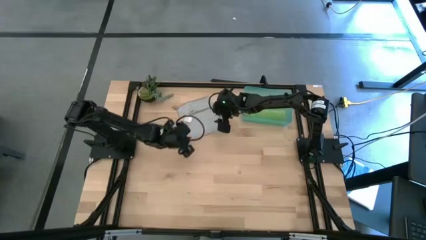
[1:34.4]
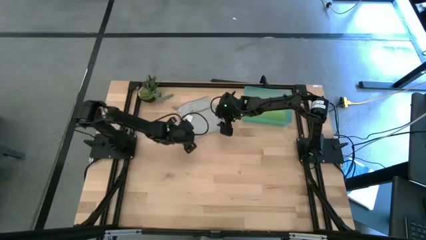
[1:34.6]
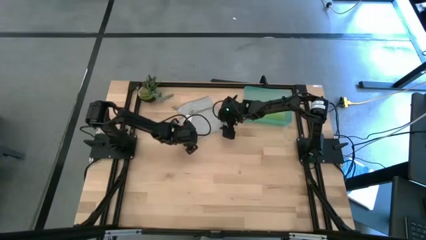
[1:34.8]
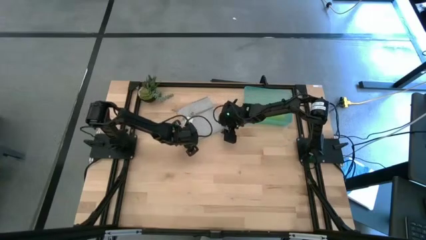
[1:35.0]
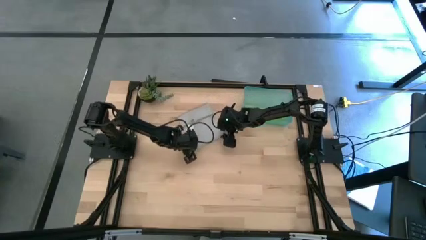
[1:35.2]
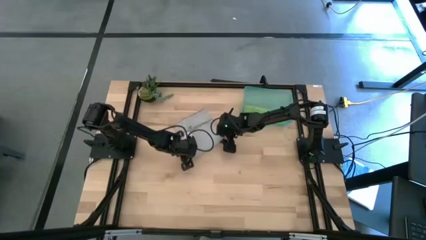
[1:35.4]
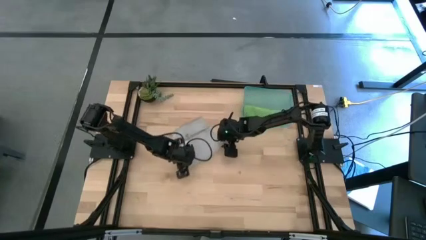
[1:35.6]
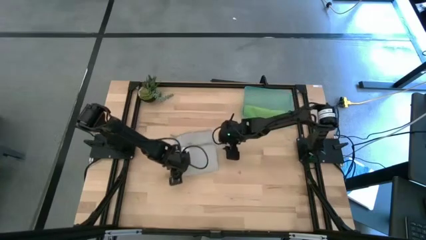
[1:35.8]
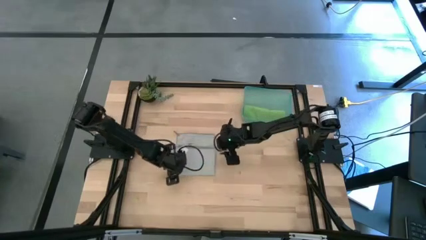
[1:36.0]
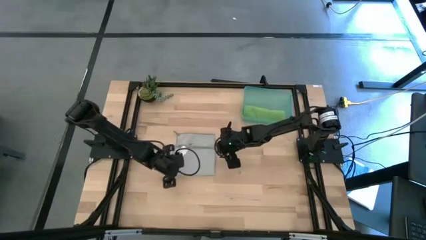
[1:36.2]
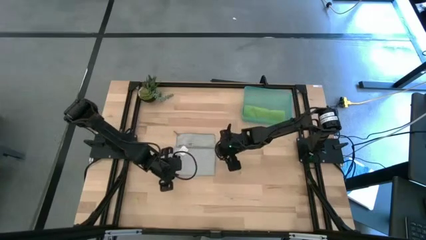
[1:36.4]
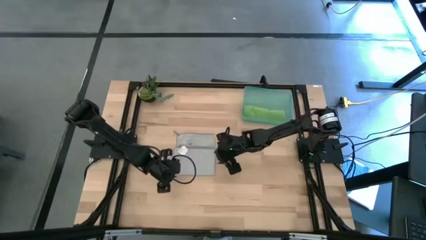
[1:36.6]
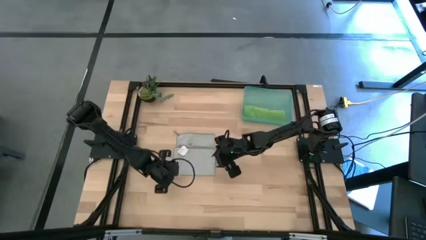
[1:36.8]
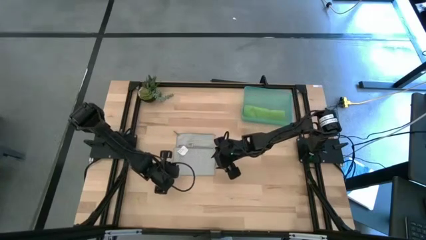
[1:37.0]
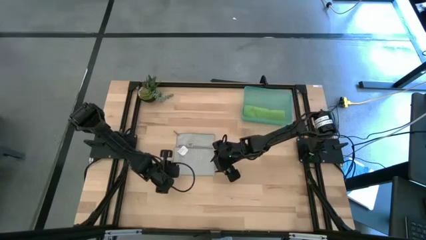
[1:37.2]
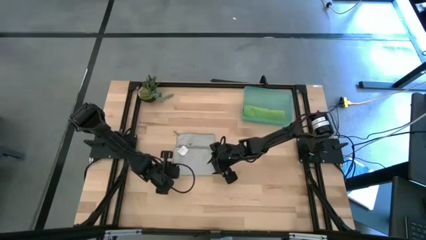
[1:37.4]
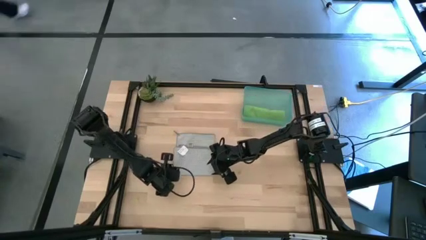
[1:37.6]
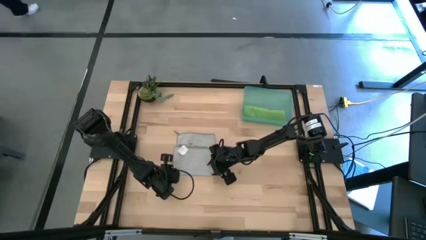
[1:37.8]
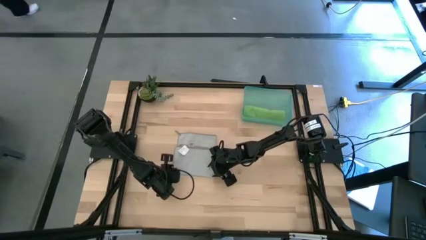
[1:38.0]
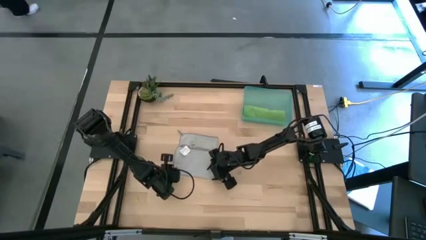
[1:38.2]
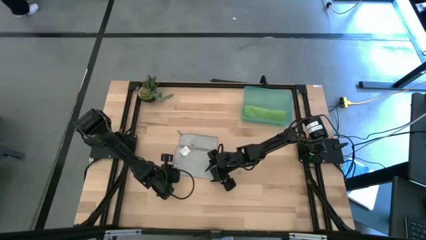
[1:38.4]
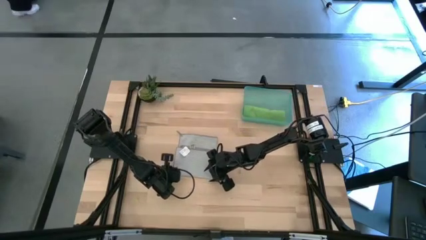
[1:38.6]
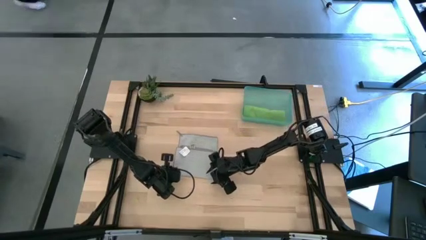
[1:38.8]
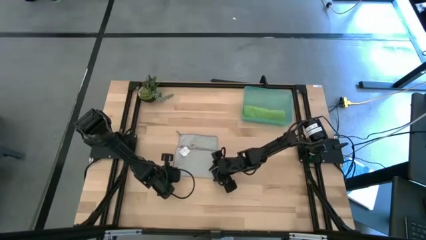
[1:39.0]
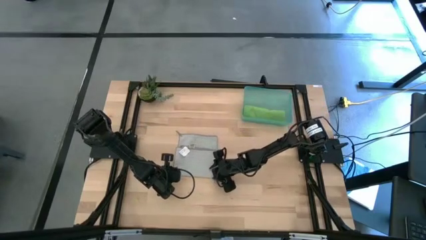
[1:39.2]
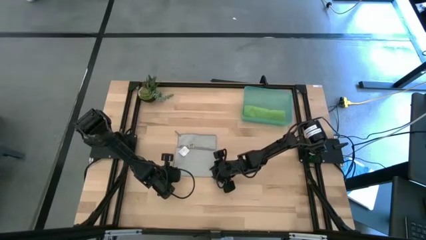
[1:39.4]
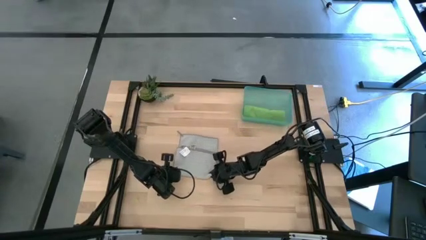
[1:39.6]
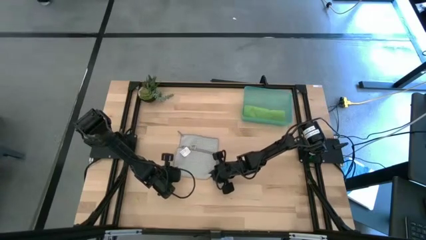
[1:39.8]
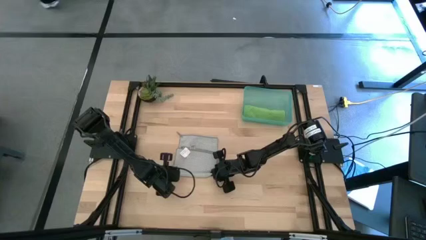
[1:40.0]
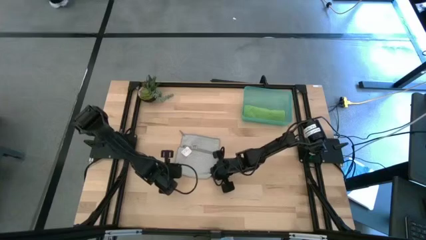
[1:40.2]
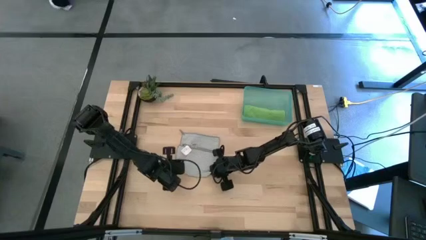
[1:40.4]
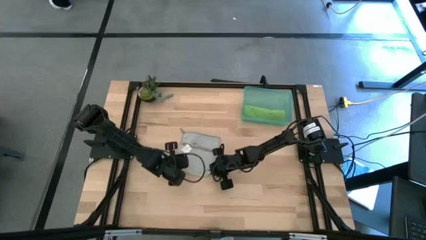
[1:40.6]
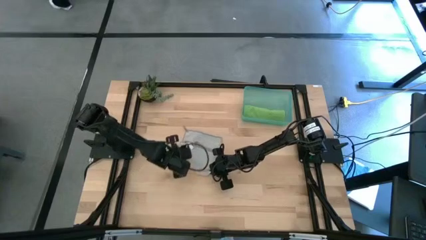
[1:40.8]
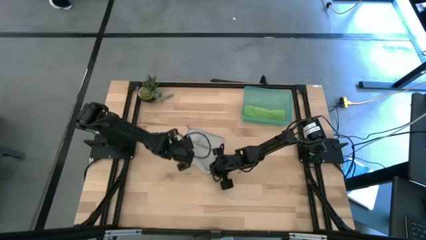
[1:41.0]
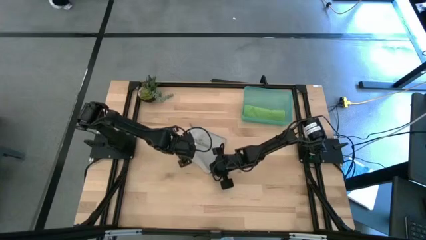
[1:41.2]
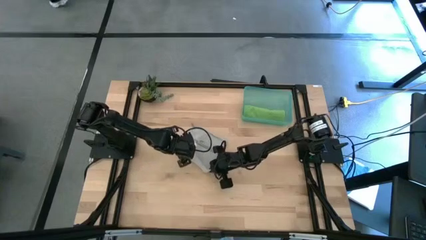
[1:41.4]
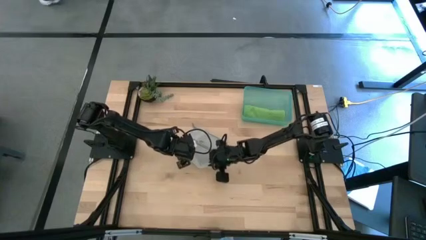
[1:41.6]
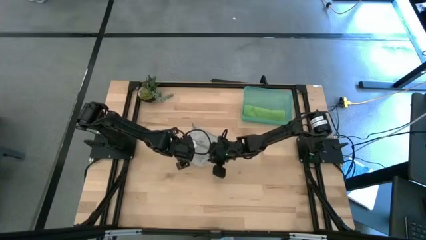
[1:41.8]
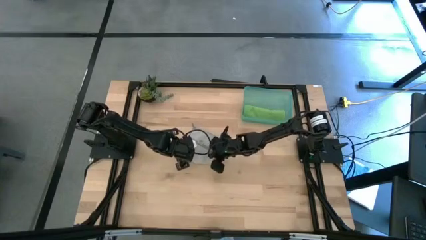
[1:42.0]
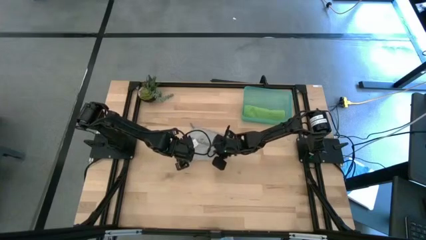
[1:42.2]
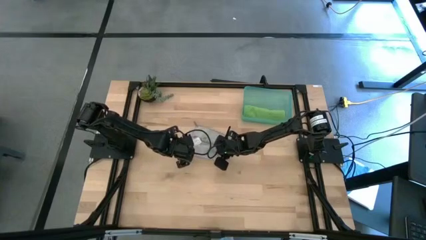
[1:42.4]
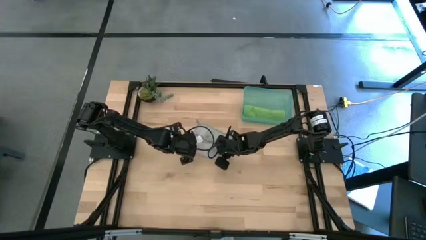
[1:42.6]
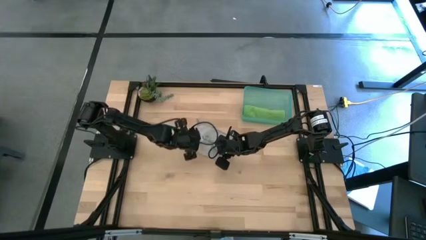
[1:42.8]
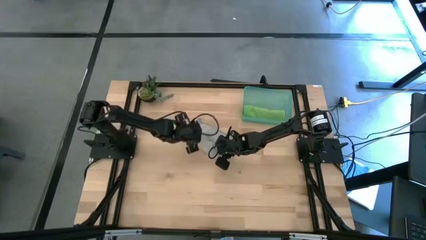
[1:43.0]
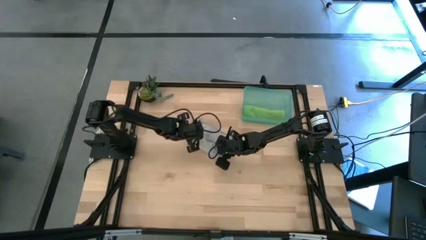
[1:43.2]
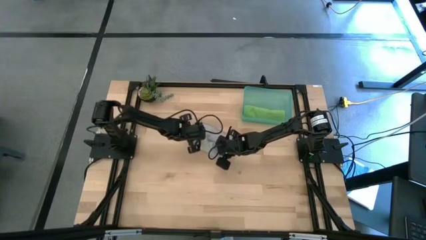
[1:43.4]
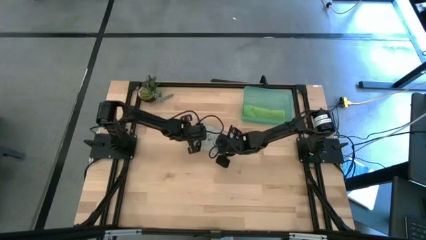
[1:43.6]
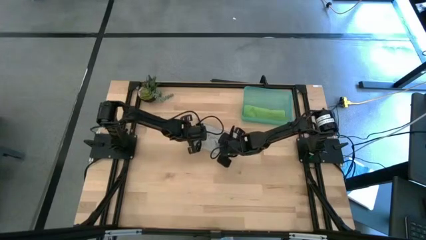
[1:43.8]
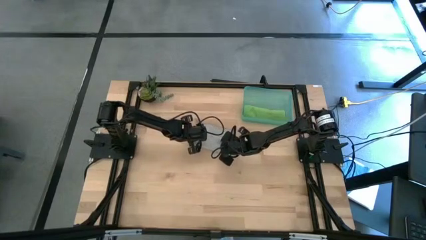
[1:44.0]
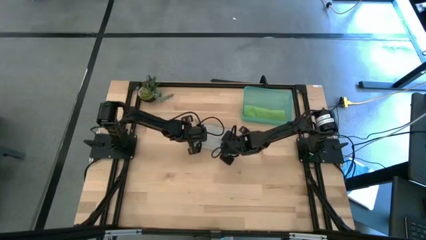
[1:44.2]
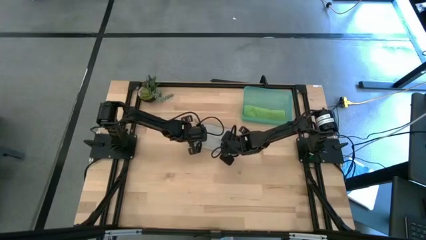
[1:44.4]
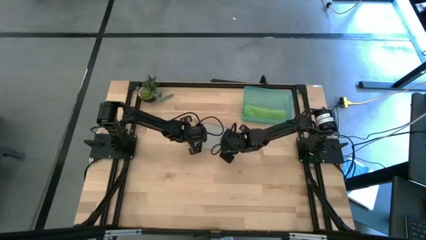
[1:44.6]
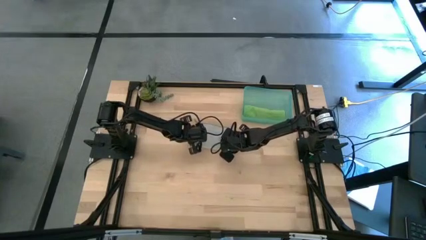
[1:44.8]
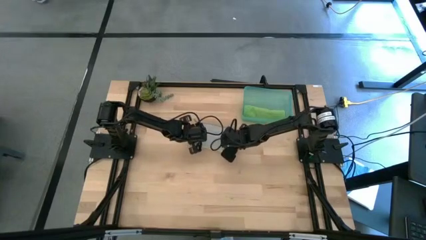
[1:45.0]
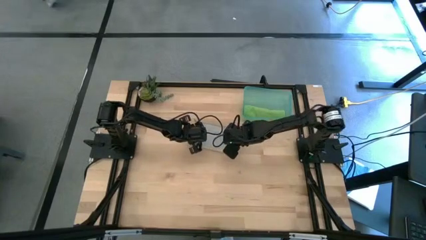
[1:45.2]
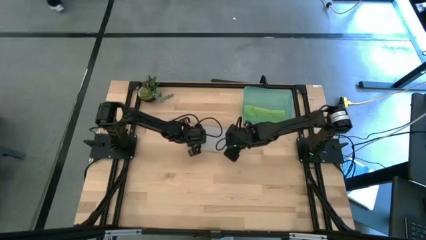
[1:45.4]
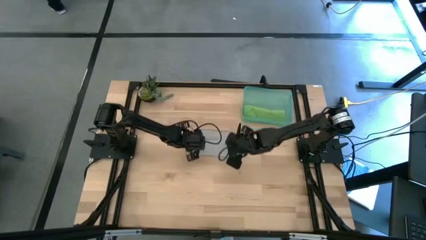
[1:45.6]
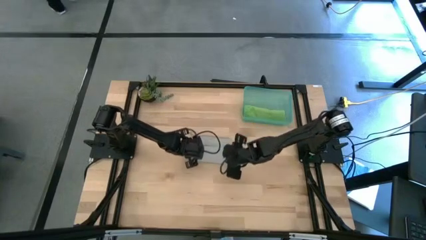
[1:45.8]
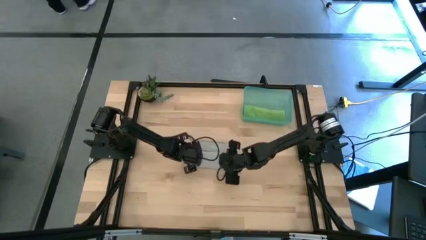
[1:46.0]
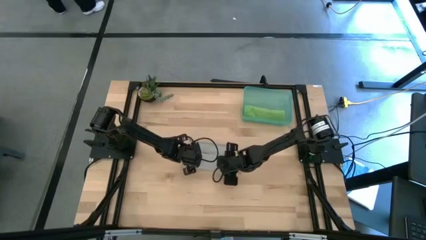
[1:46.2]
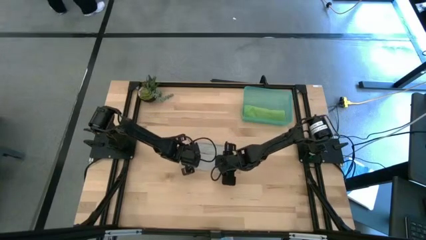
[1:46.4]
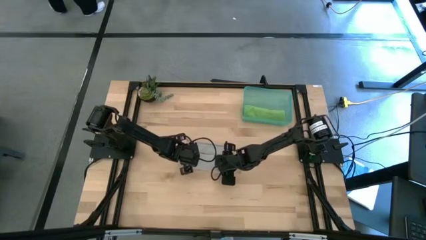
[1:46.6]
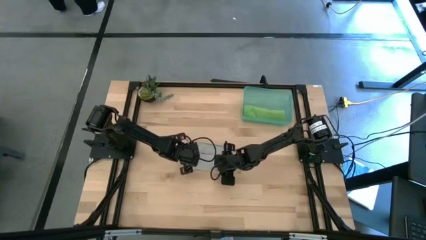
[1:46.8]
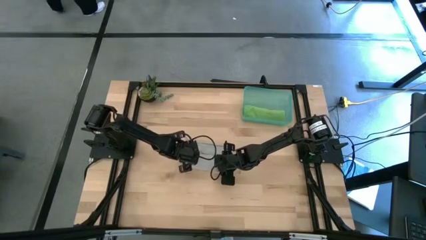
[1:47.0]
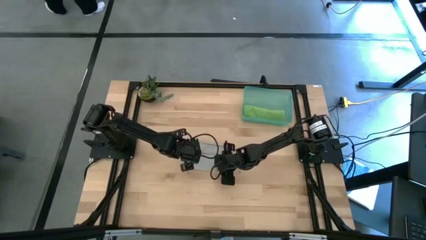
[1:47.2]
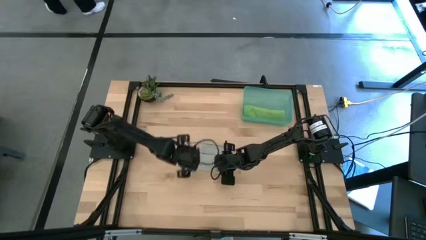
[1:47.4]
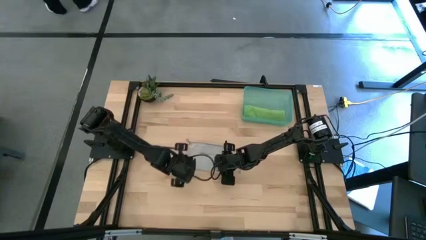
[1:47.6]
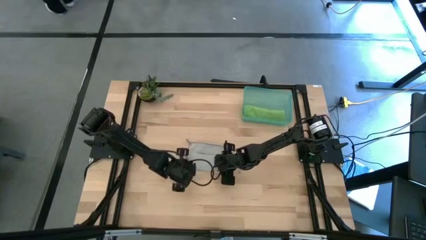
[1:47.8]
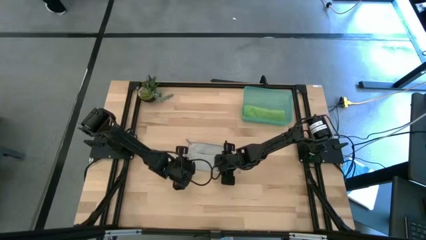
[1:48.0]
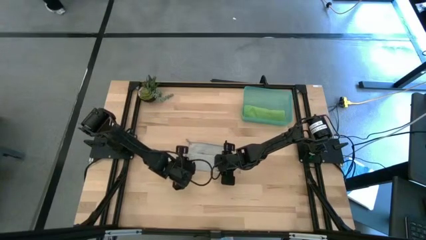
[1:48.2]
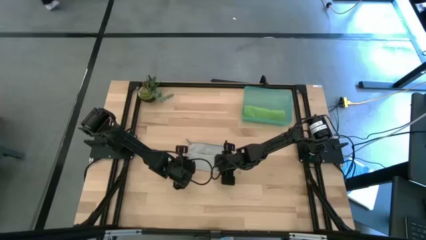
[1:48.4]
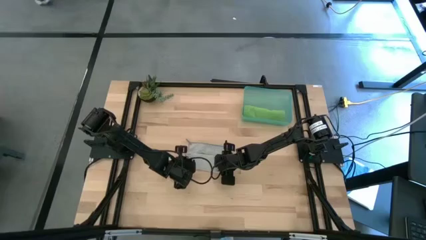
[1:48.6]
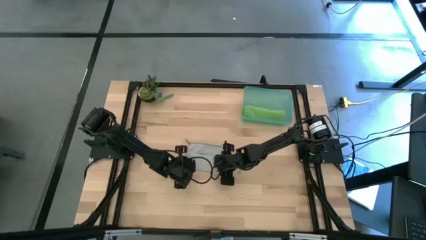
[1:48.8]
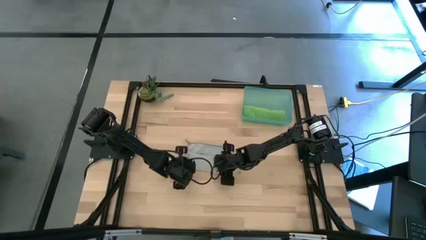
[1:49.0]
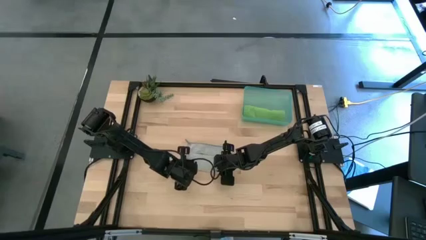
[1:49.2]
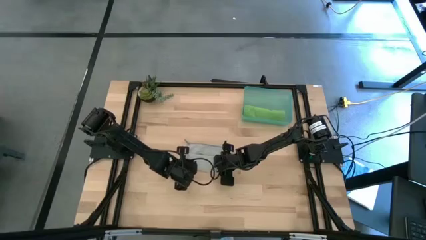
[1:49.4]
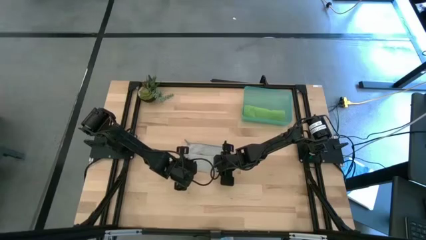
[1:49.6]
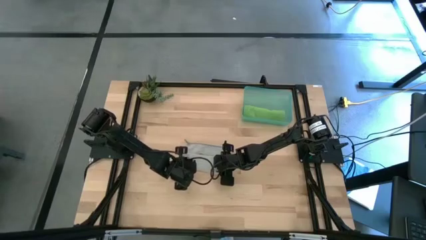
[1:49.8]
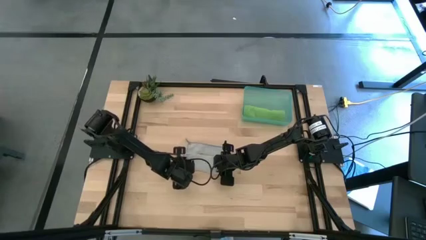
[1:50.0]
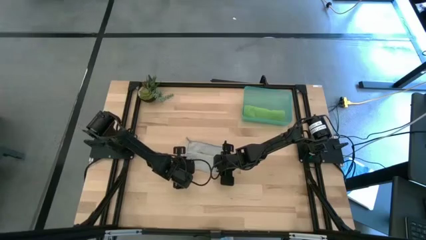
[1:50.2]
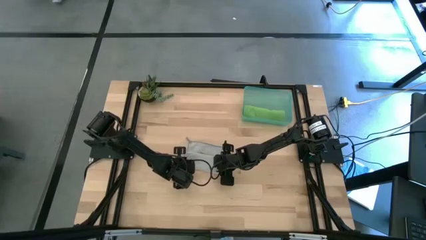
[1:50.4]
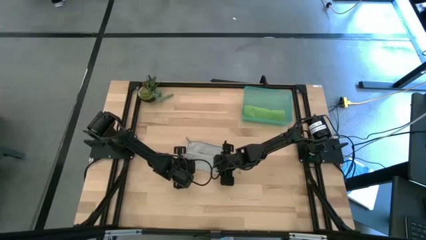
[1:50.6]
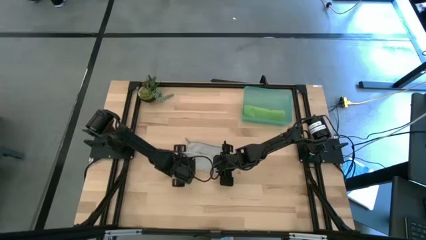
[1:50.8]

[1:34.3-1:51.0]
Task: Roll microfiber towels into tight, uniform cylinder then place into a basket
Roll the gray kitchen towel
